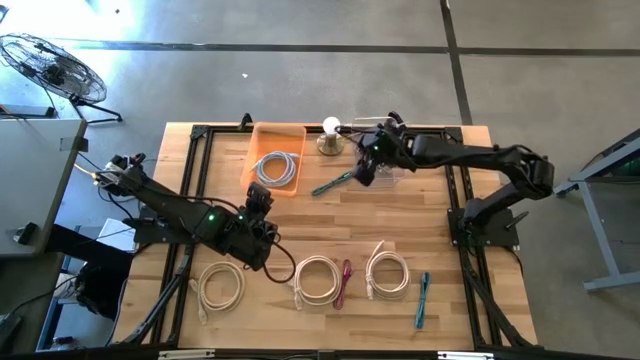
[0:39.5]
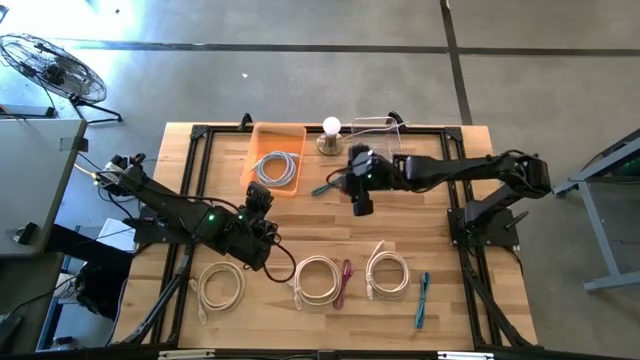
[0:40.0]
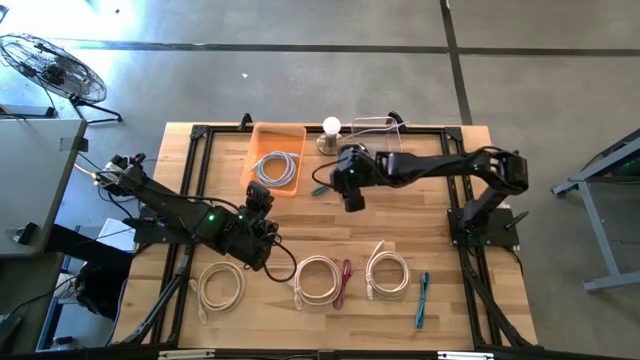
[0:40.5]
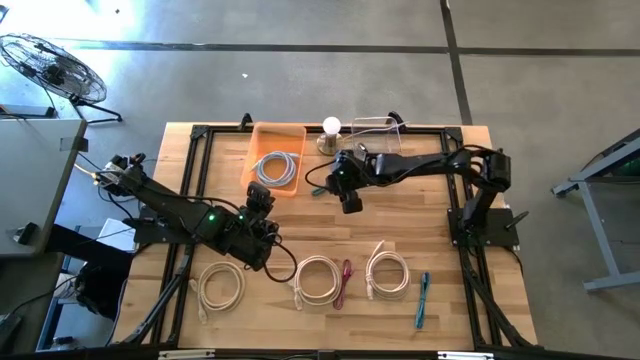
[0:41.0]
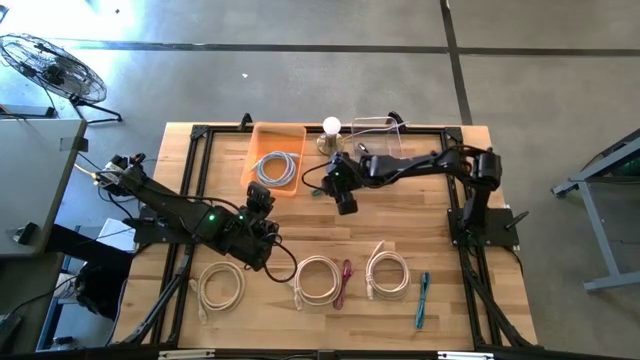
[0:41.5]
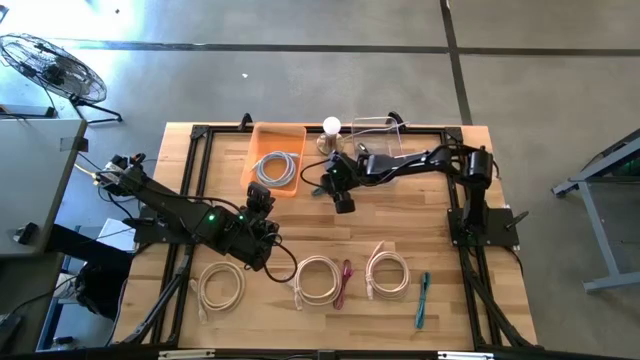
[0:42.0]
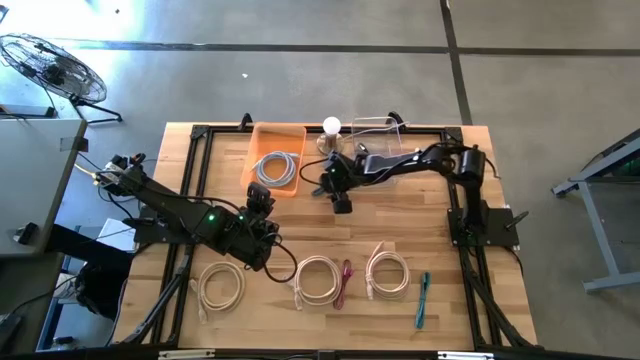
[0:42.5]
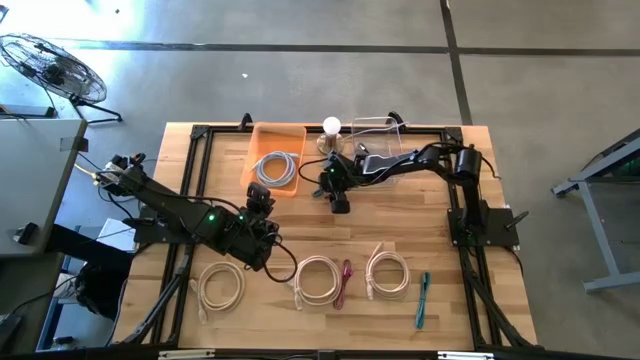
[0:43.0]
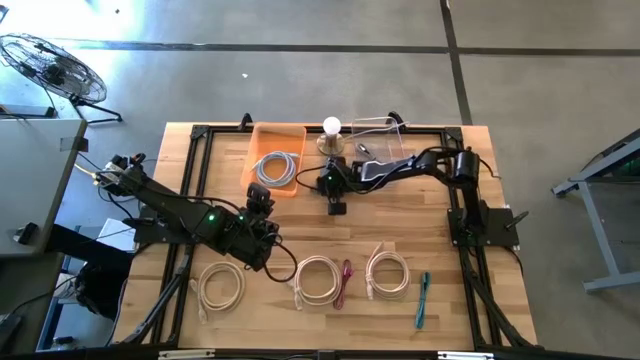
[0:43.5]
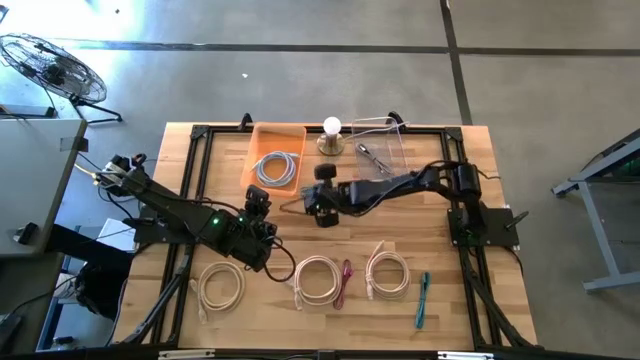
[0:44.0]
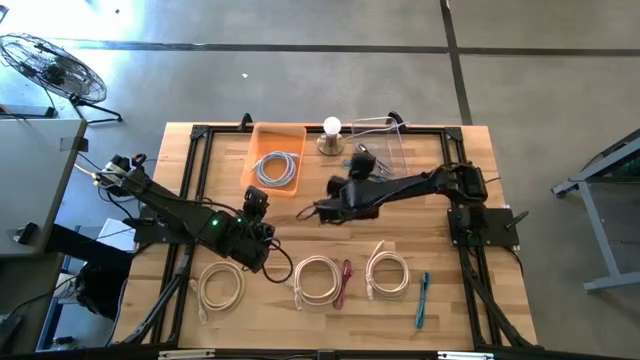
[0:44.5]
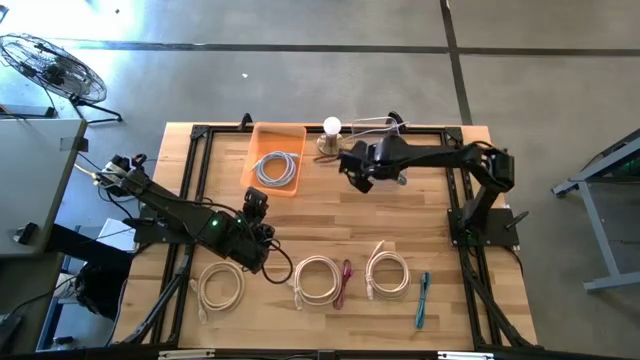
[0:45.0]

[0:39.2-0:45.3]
Task: Pick & Place USB Port
Put the top blue charger cable into the transparent bin

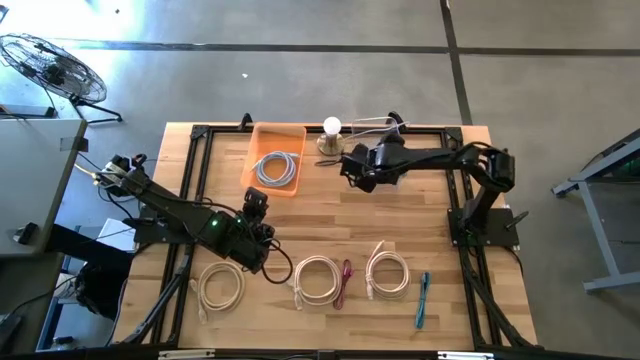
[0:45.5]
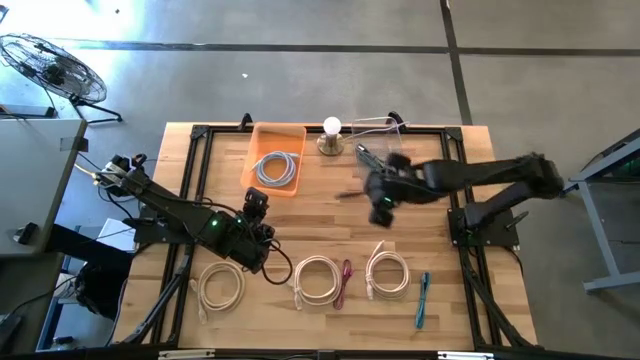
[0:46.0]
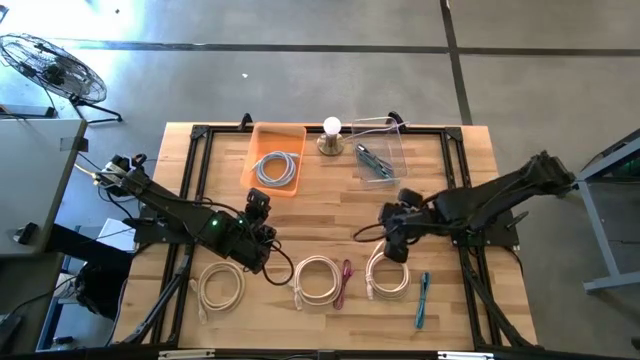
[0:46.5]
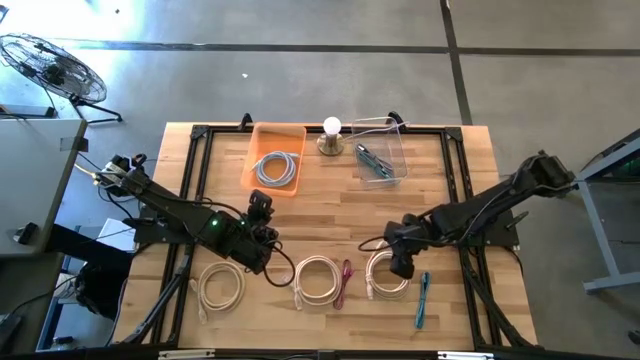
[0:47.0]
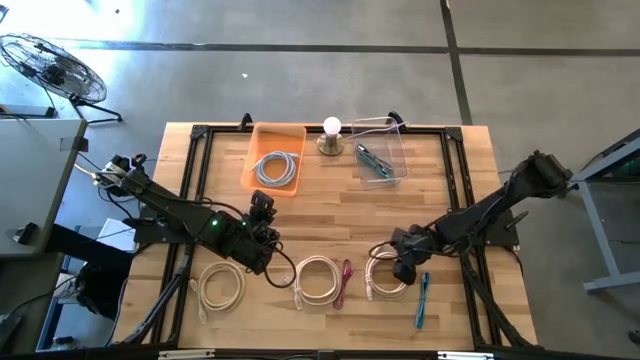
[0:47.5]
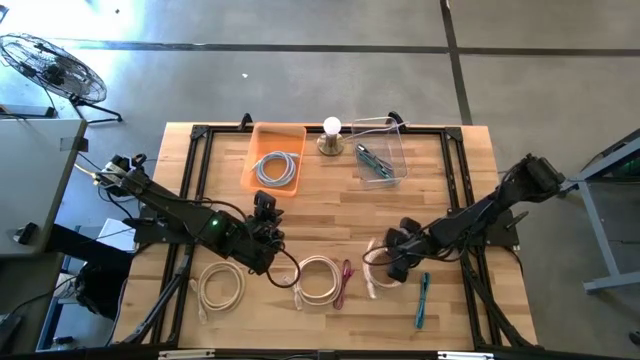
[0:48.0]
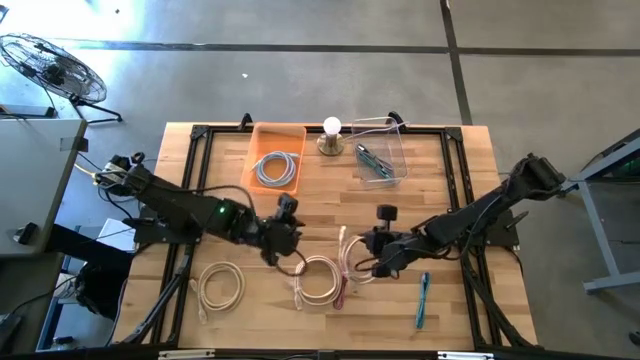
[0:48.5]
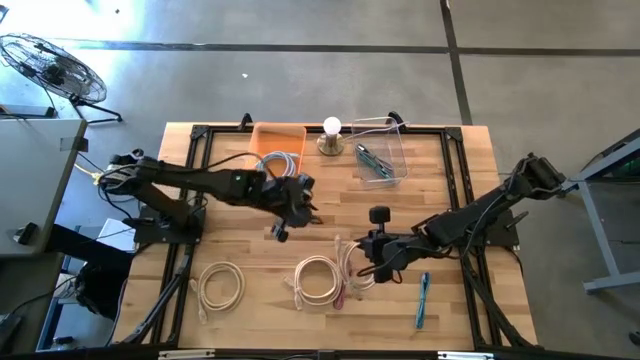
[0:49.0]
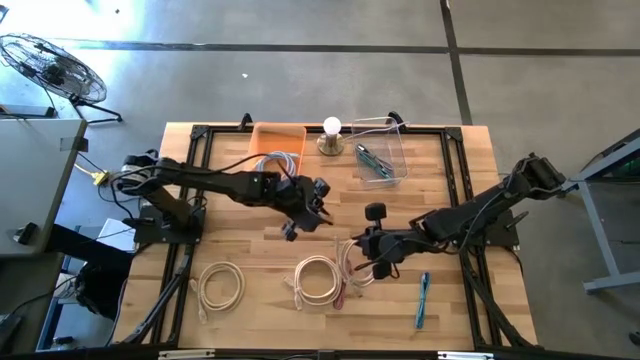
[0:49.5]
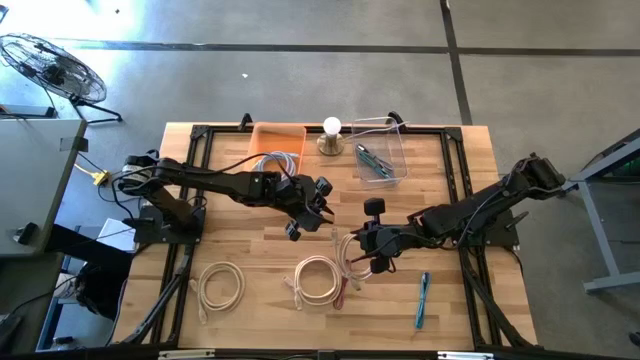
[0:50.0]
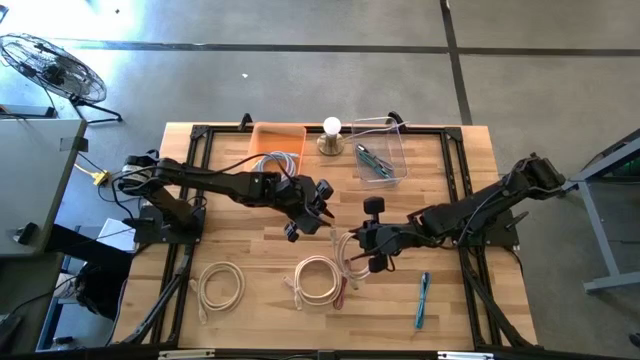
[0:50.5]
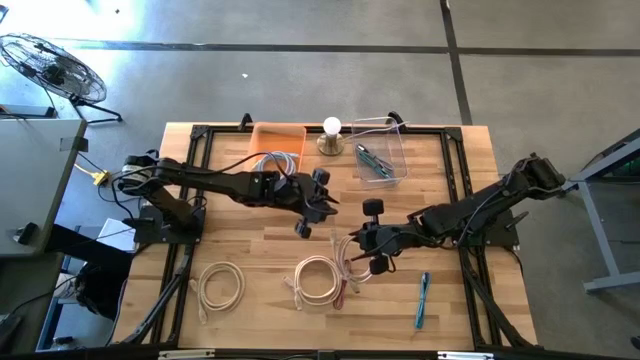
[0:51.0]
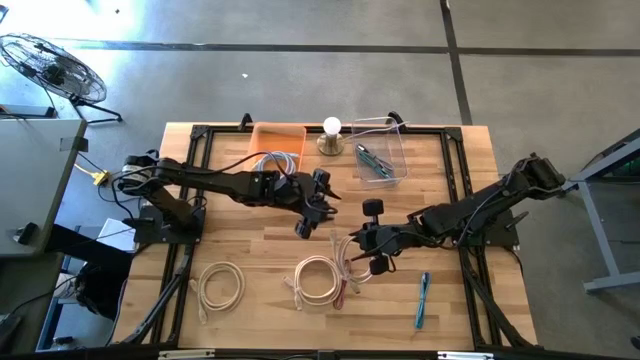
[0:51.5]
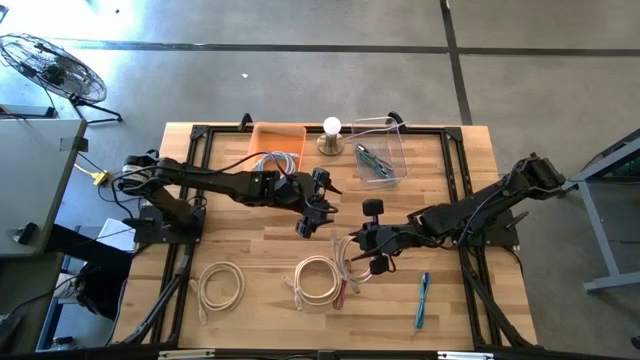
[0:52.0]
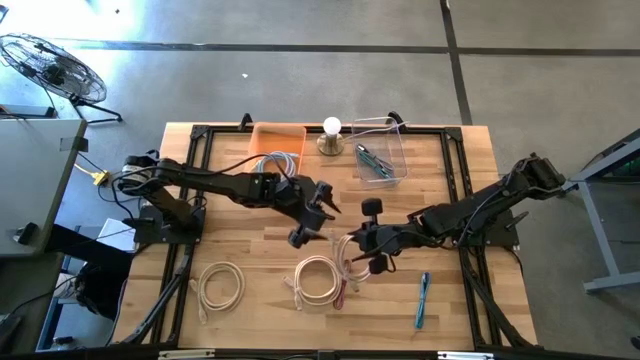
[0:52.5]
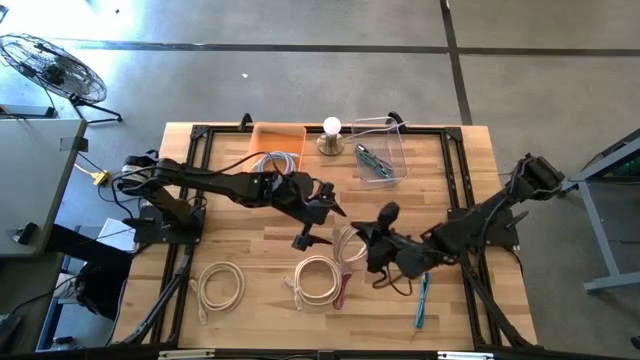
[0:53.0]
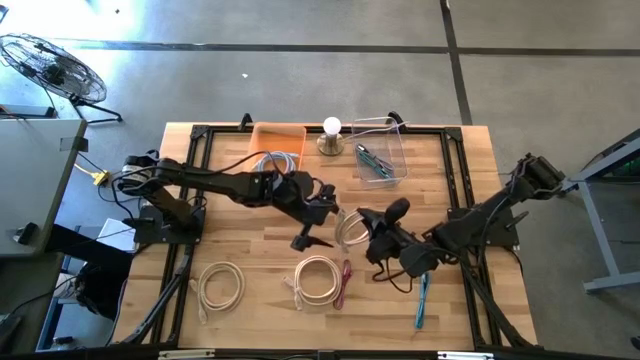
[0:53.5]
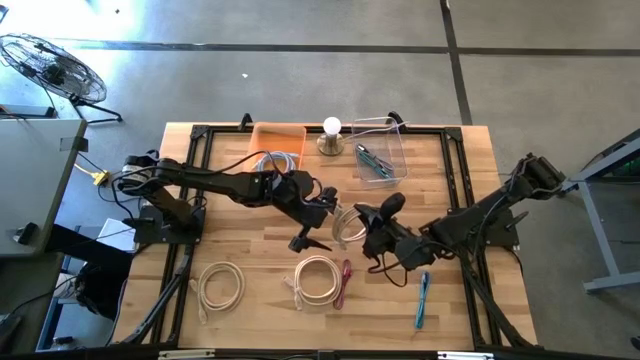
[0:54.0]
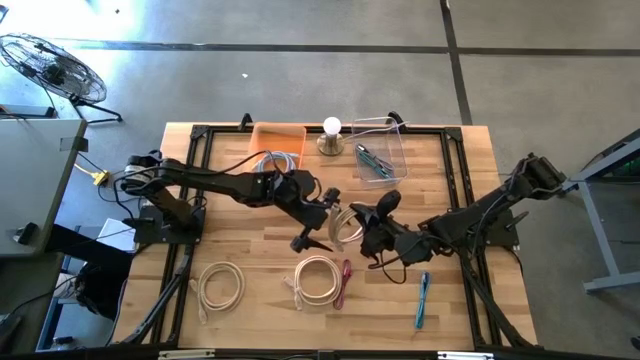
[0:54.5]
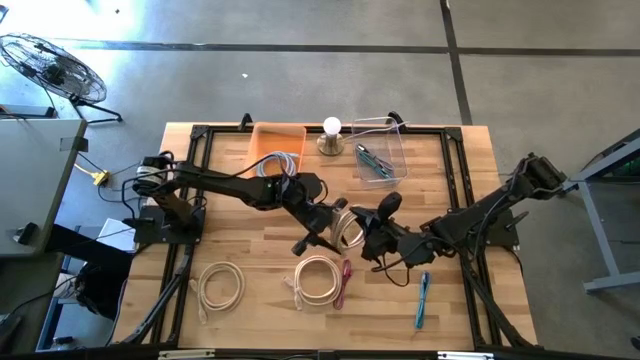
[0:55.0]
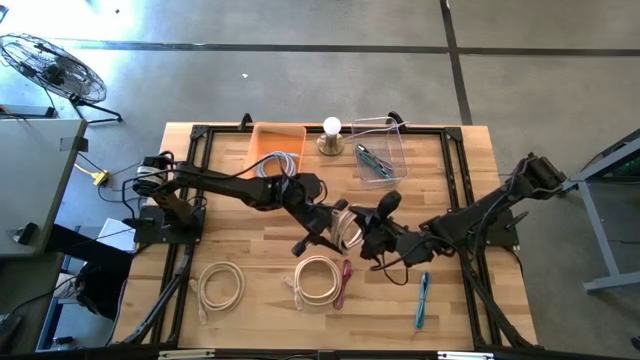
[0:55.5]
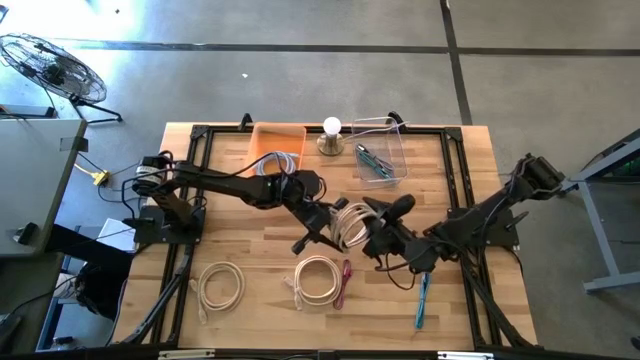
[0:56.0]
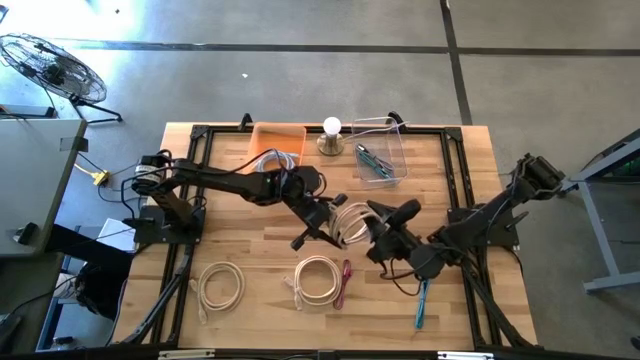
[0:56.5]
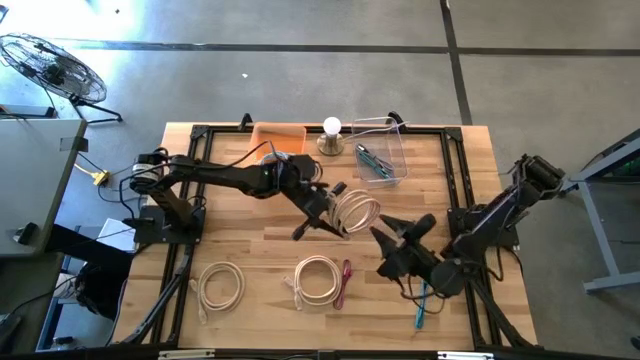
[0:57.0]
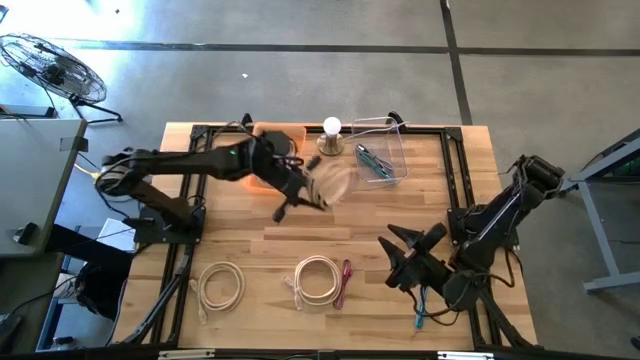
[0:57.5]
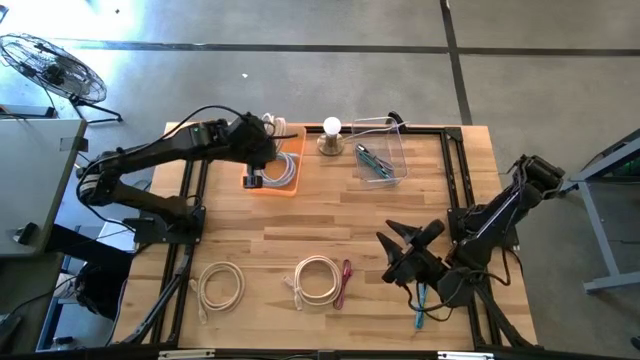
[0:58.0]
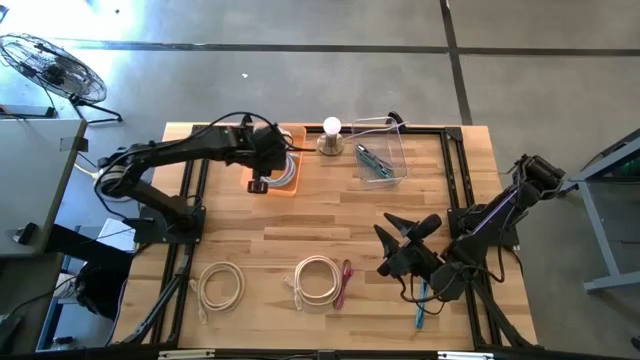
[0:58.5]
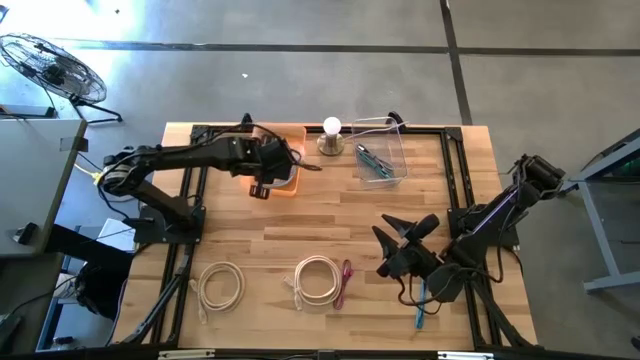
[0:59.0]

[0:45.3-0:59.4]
Put the right light brown HDMI cable into the orange bin

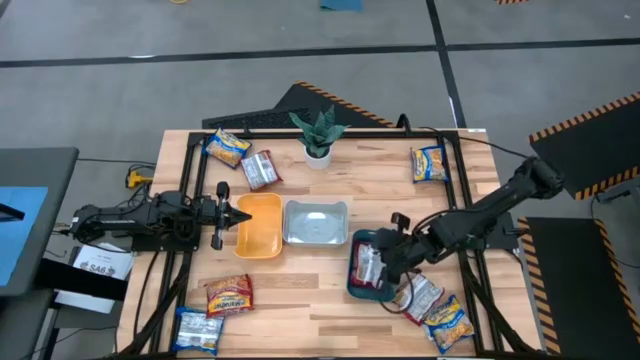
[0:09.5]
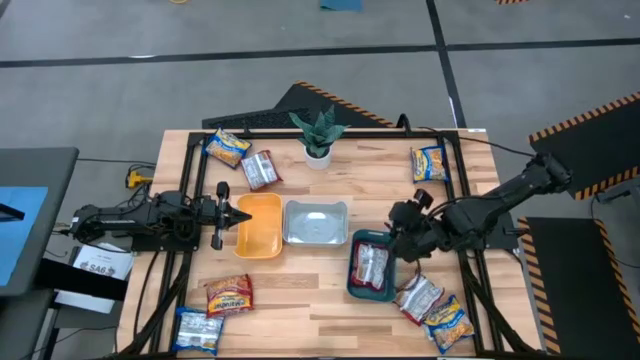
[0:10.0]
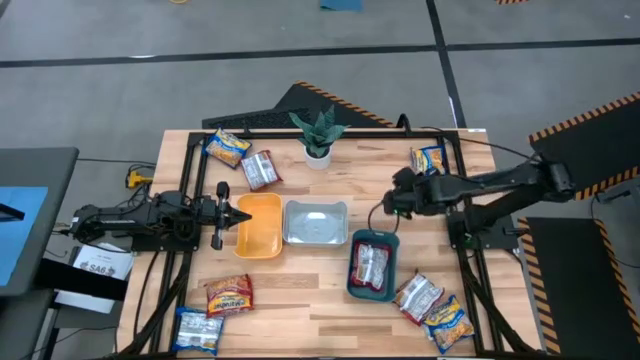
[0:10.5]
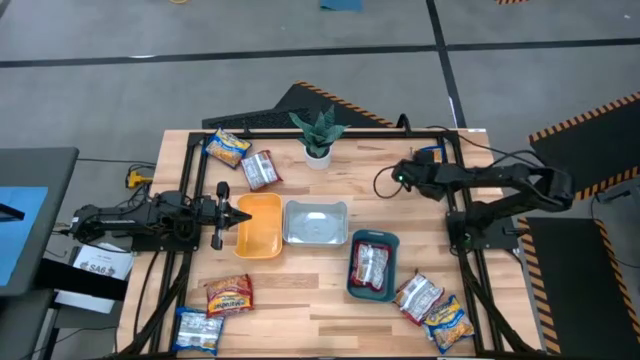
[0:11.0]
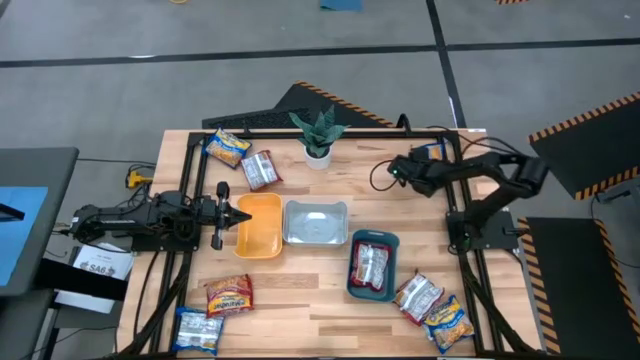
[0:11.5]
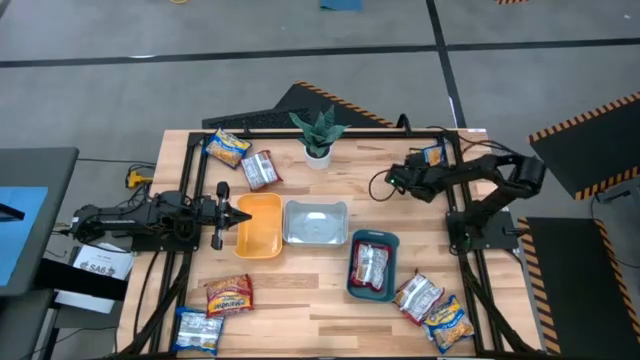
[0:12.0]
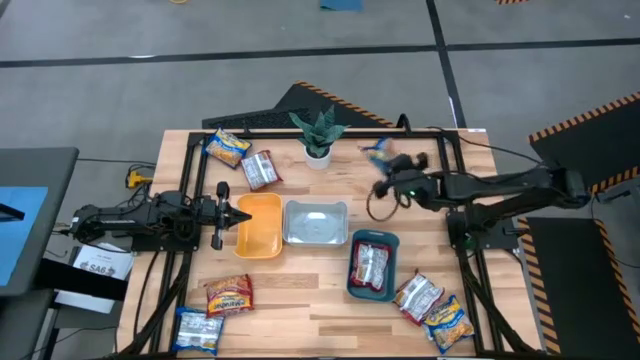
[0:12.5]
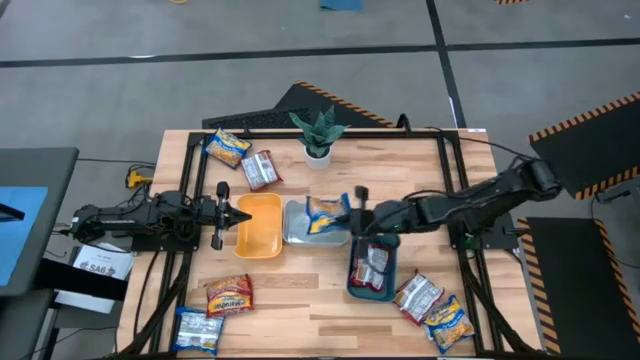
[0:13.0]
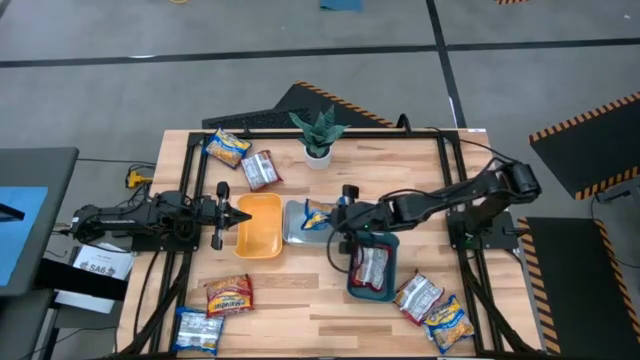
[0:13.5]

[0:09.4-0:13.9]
Task: Sort Maruchan noodles
Put the top right blue noodle pack into the gray bin
